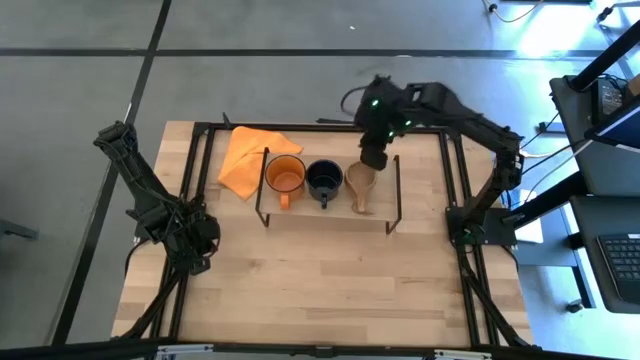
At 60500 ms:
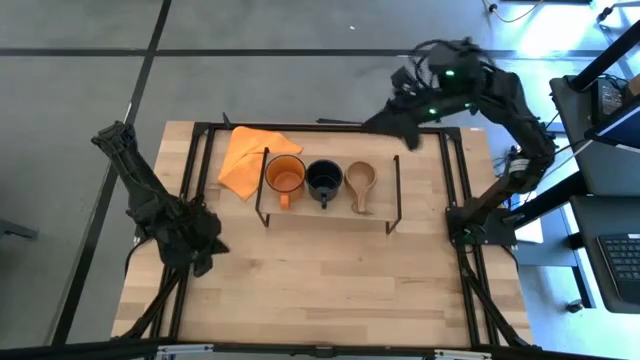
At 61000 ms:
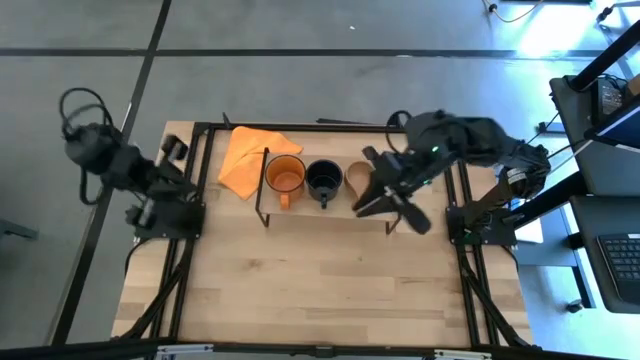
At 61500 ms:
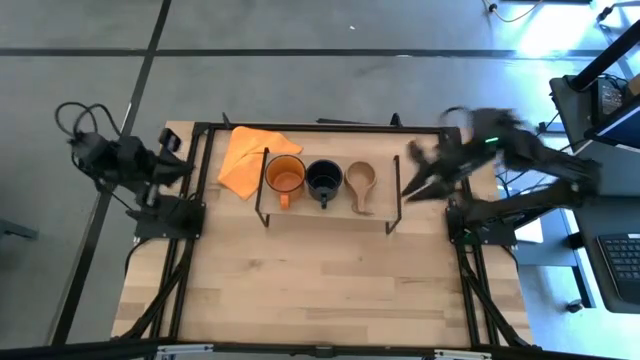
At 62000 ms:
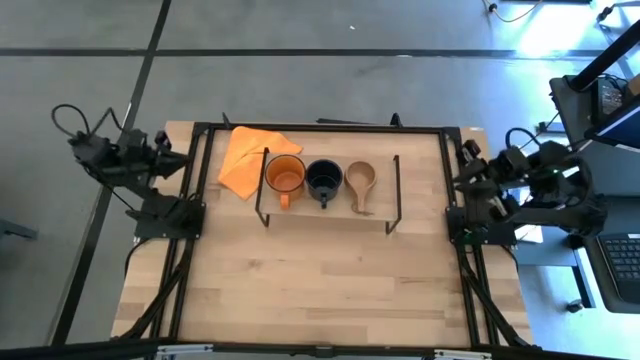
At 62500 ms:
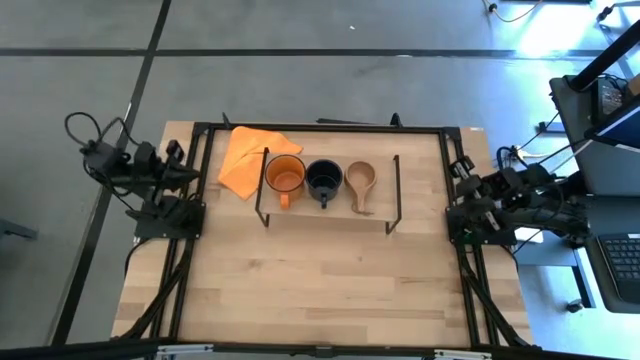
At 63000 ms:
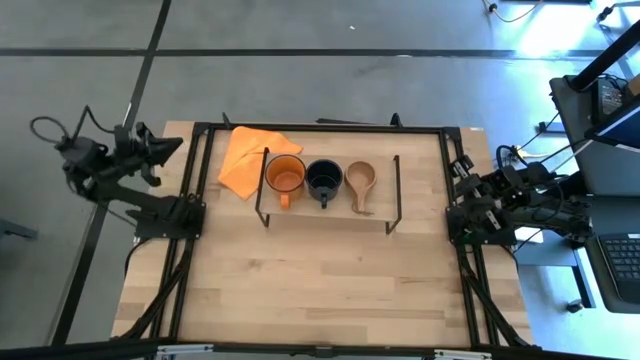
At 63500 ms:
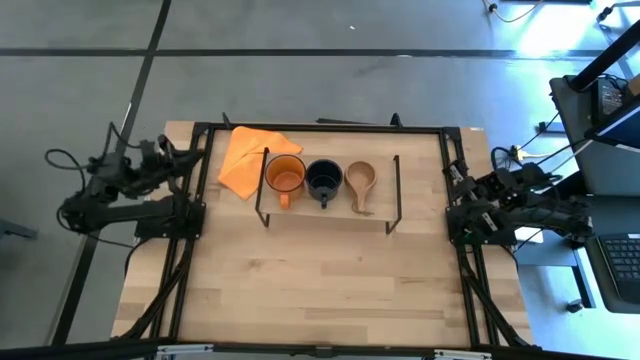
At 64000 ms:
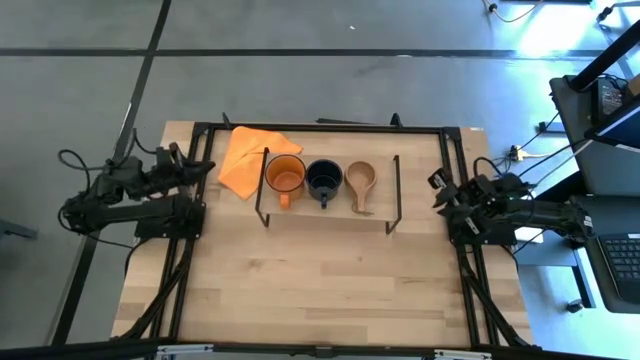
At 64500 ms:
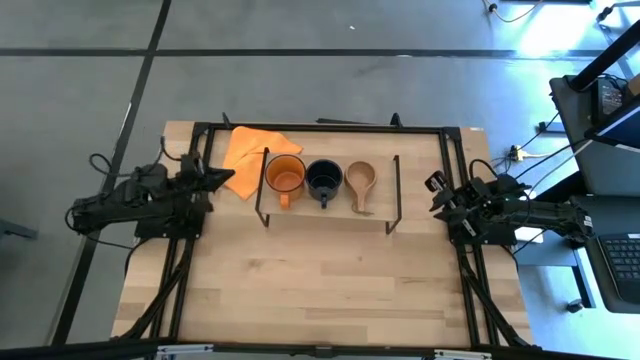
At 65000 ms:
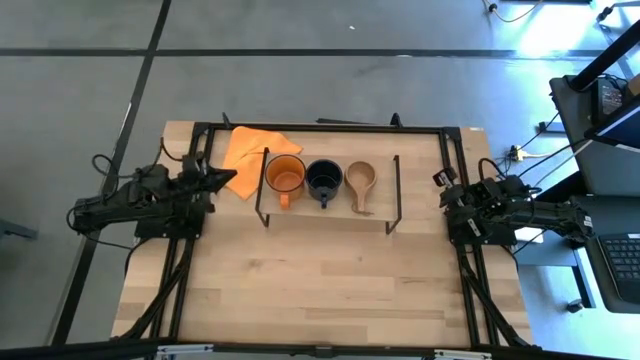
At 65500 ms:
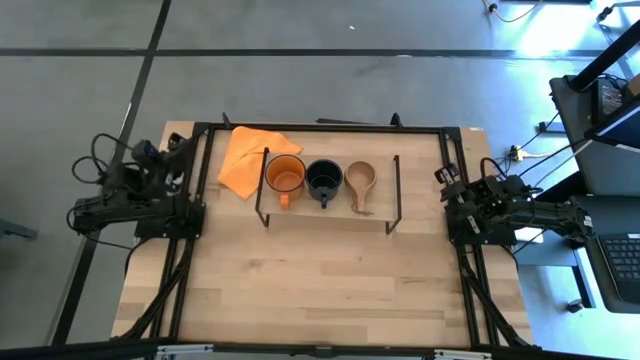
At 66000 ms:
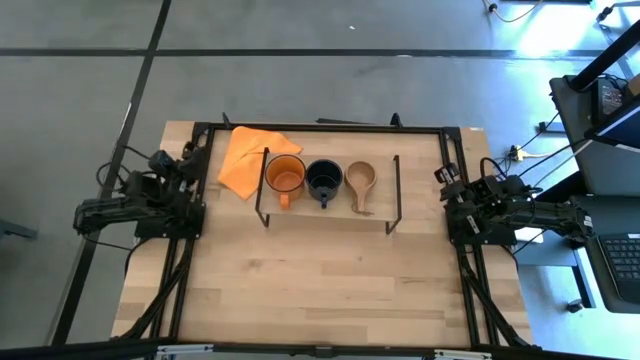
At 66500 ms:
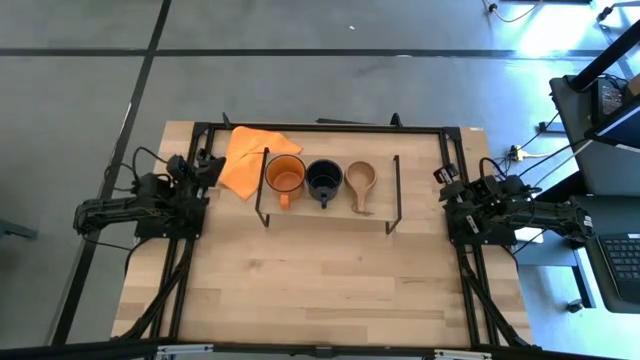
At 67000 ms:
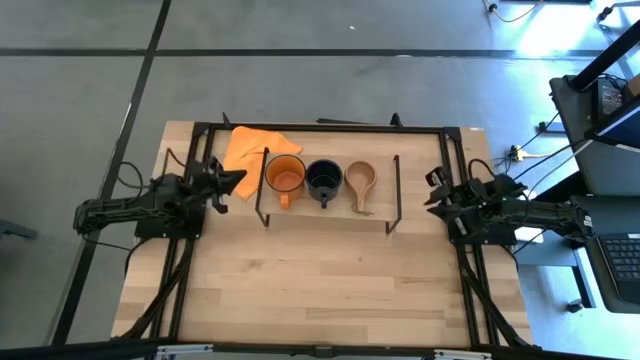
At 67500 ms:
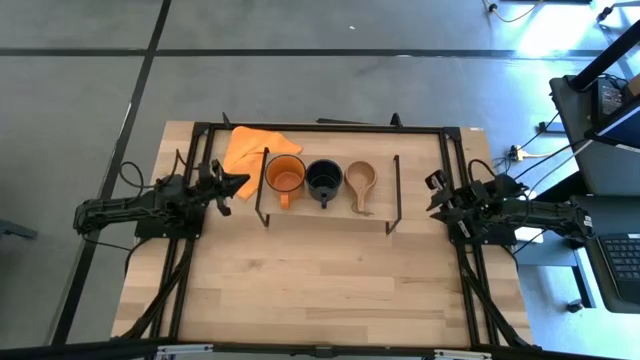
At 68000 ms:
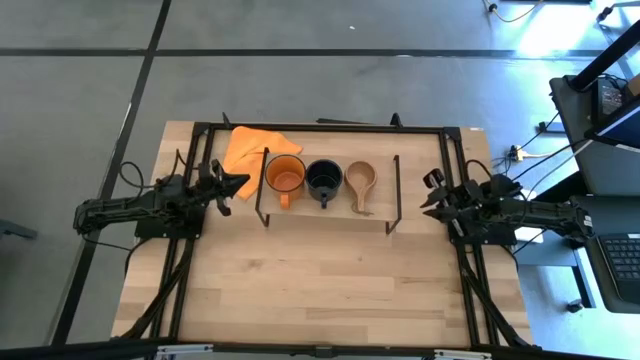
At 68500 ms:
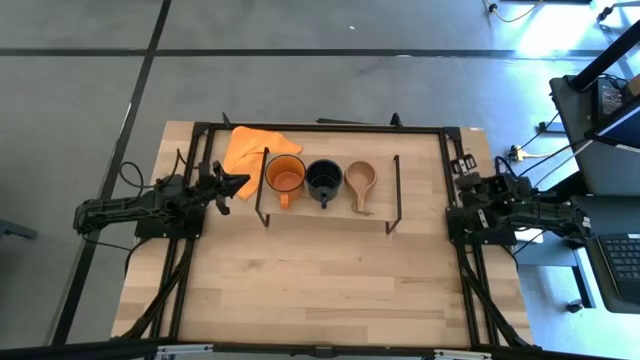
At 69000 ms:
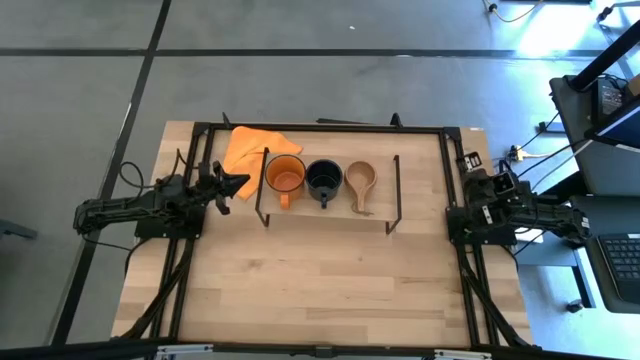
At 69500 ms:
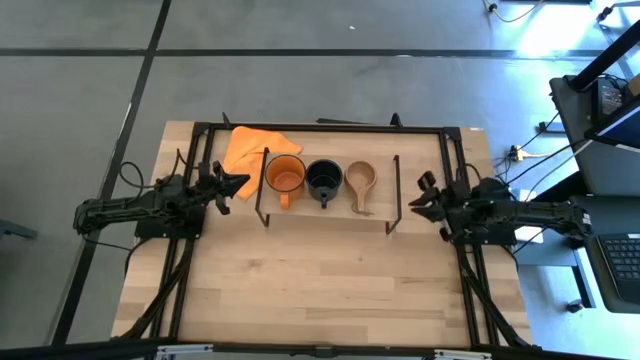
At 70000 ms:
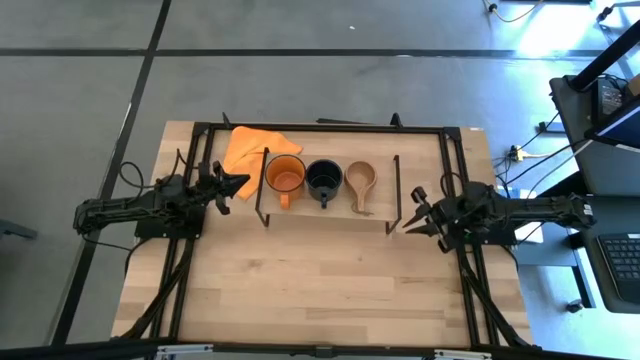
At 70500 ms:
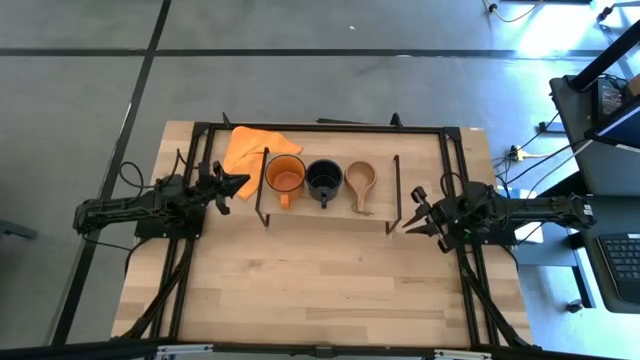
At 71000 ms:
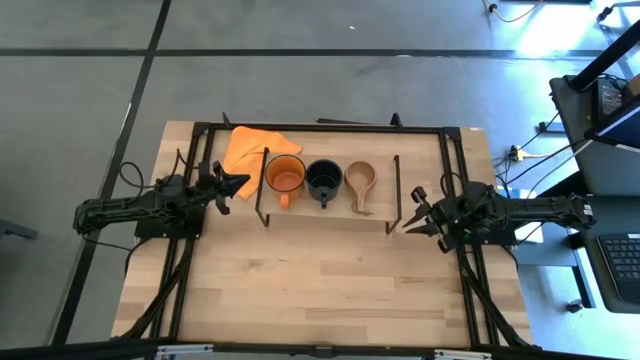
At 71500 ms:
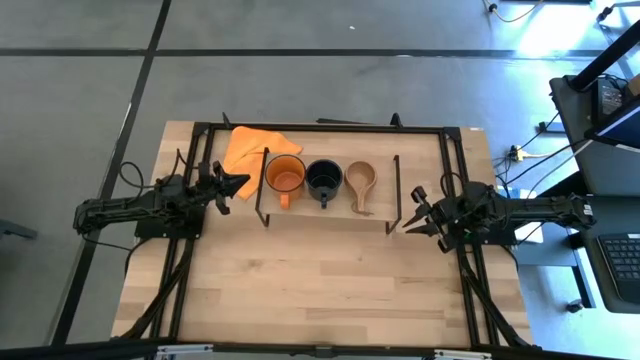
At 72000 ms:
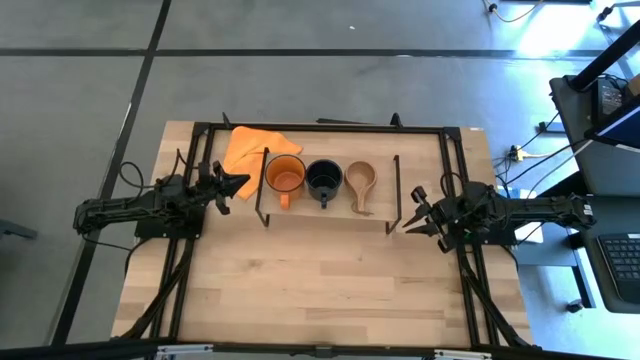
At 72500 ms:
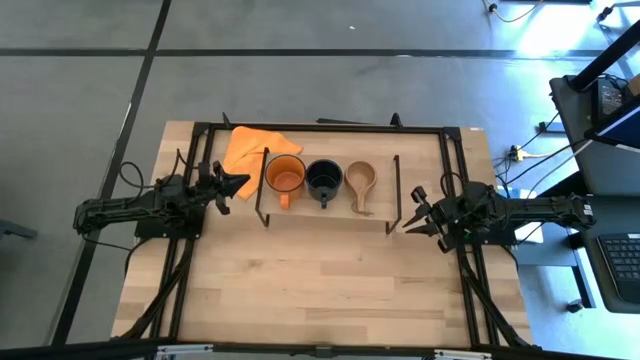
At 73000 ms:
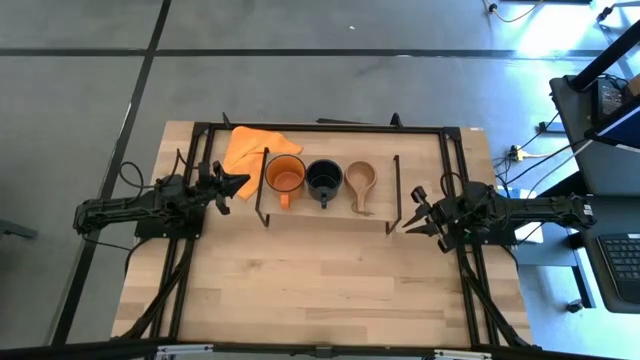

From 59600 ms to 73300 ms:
Task: Stack small to large cups/mugs on shelf
Return to Home Position

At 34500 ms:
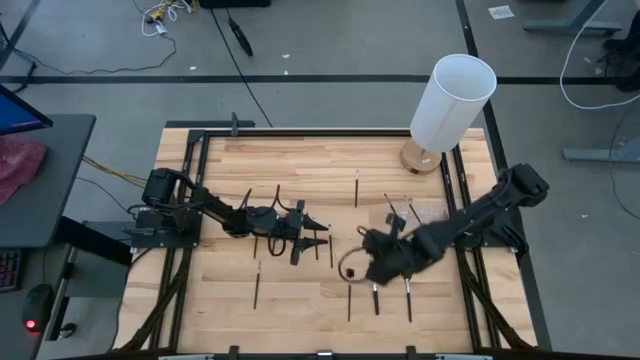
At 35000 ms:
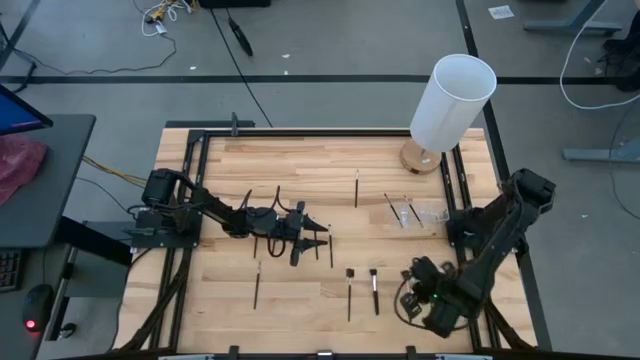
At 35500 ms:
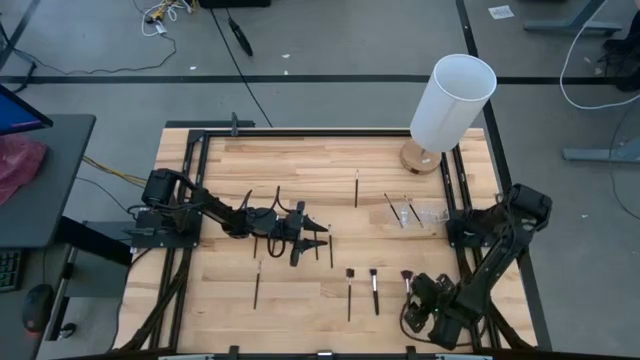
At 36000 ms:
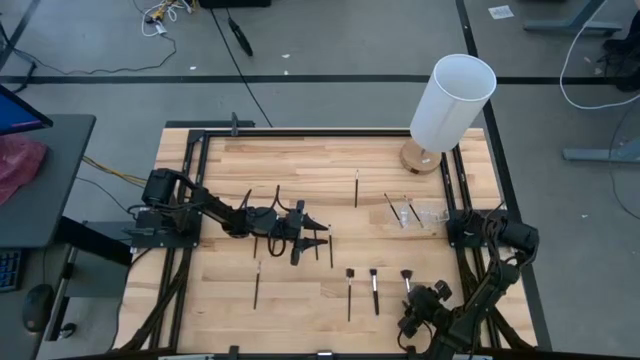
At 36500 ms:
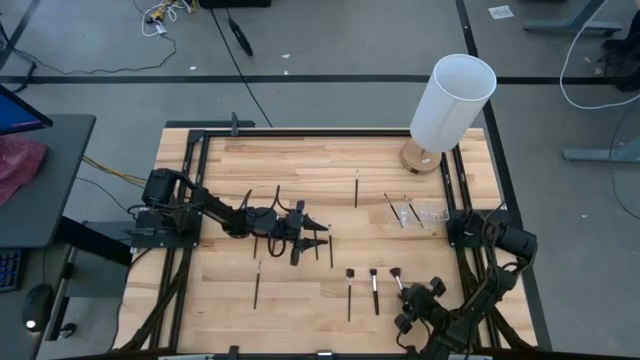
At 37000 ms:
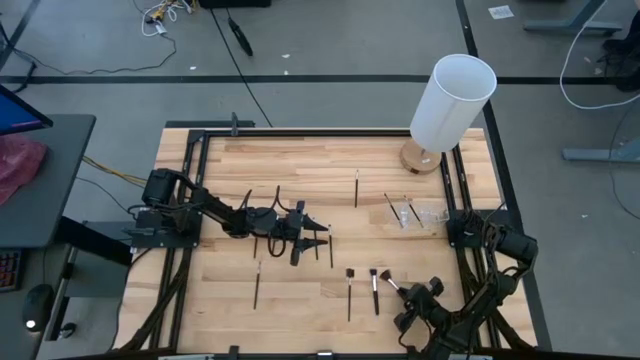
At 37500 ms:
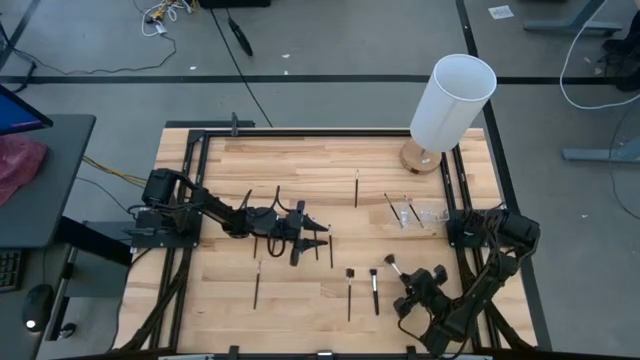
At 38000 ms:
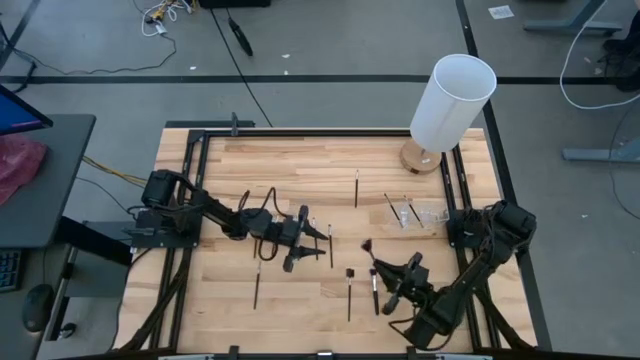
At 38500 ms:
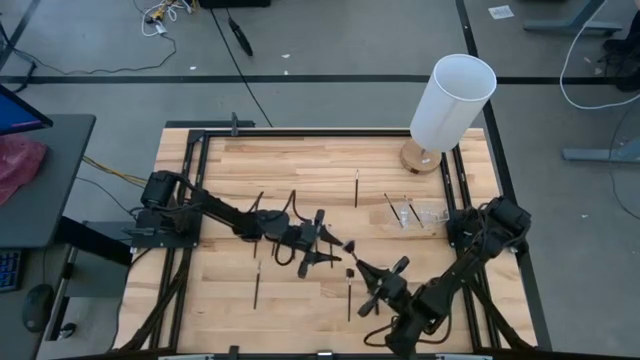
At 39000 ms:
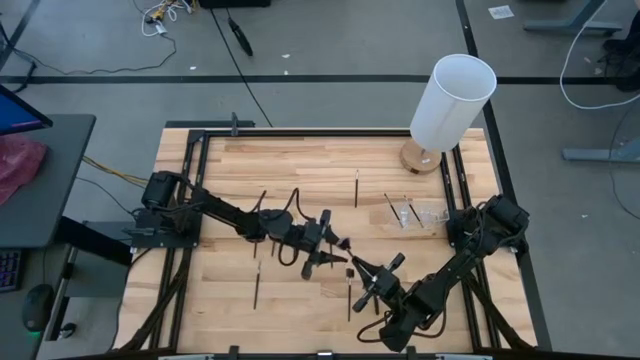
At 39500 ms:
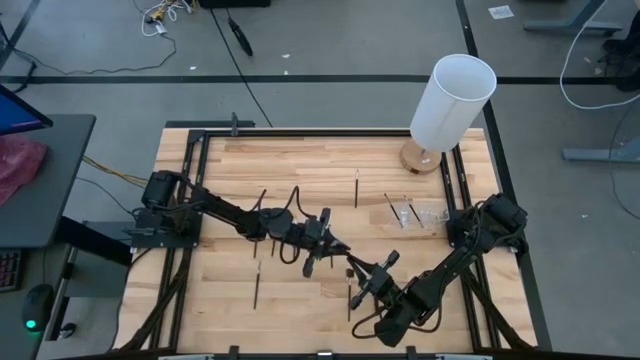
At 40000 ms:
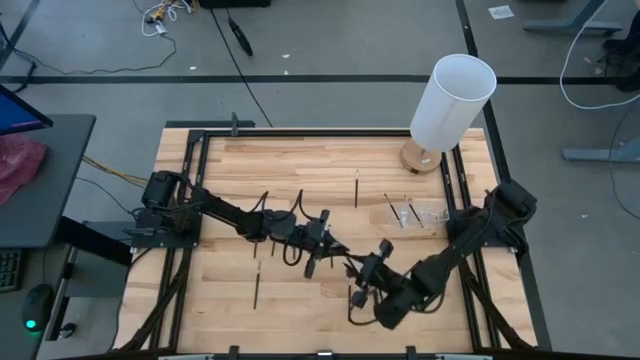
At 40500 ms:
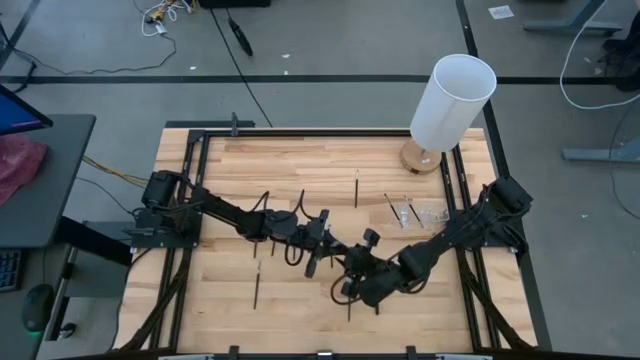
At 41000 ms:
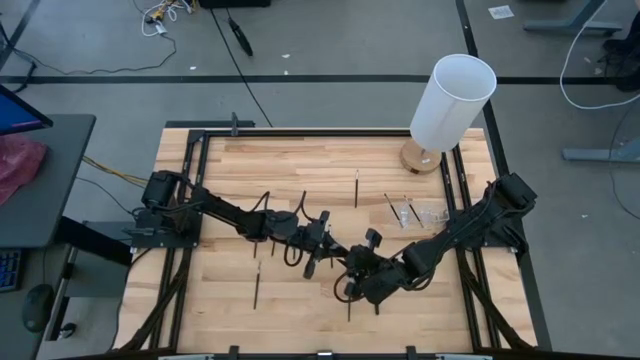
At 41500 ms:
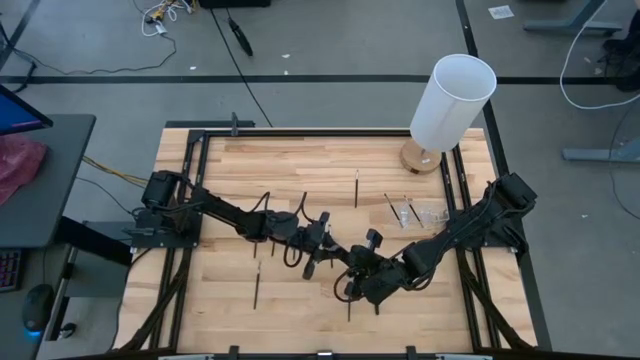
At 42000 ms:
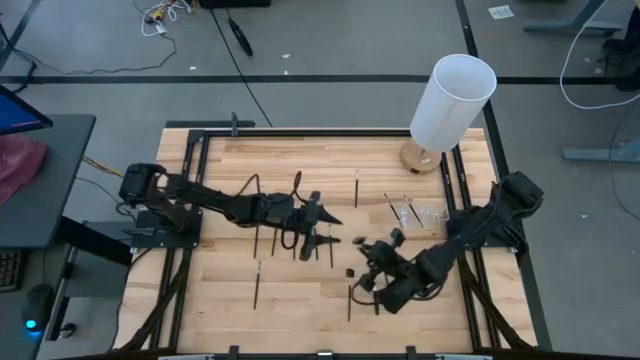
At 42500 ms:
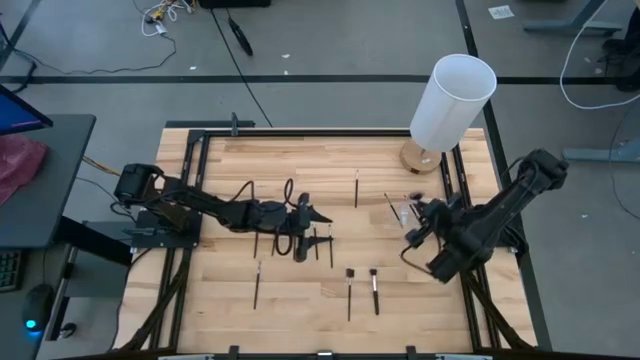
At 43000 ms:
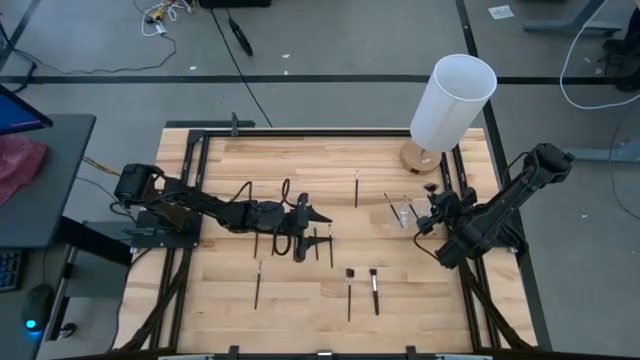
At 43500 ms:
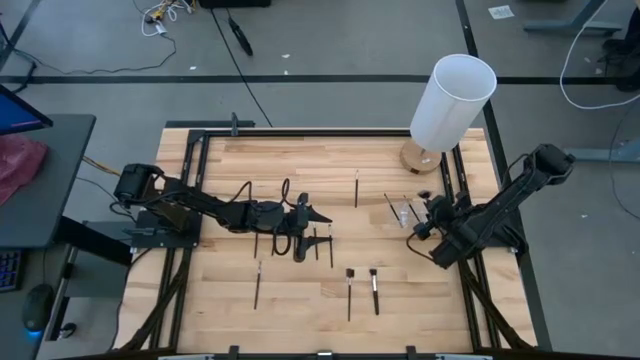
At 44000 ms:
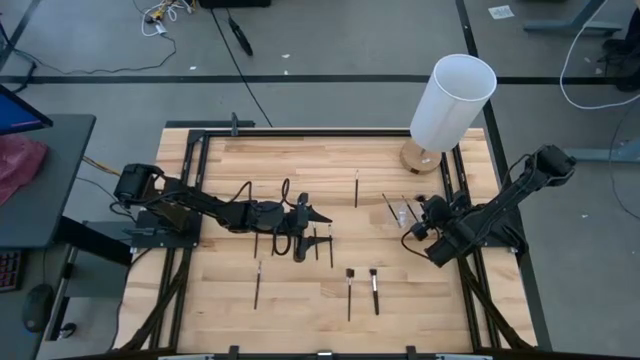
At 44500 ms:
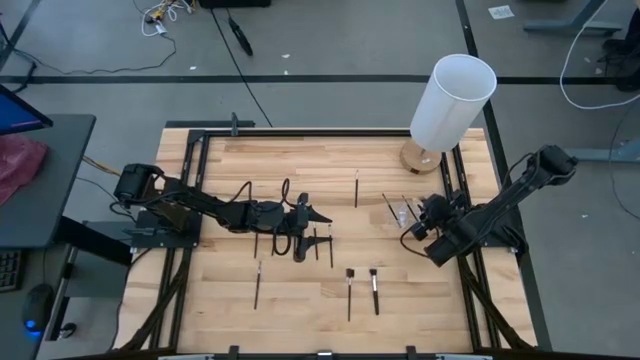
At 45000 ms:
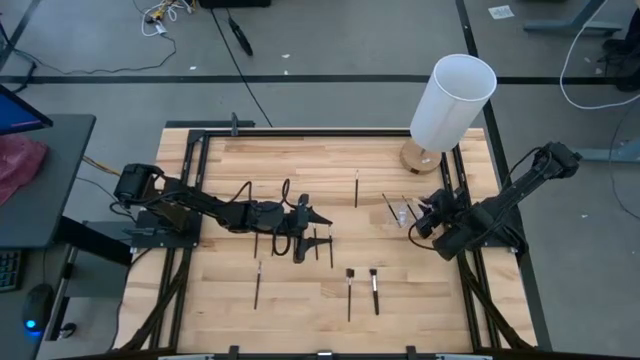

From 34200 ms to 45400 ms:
Task: Put items in baskets/containers
Put the black highlighter brush into the transparent bin
